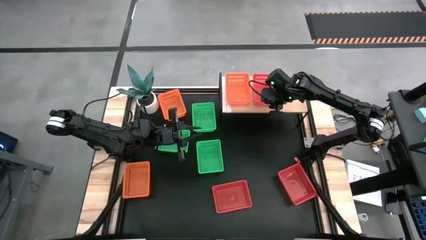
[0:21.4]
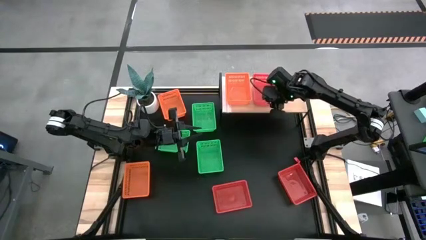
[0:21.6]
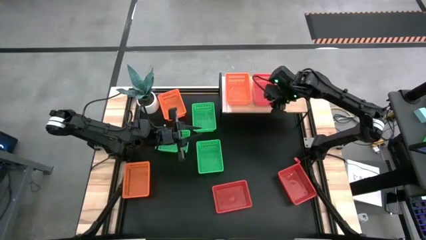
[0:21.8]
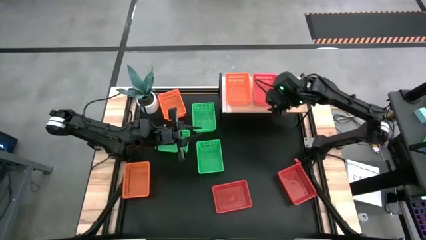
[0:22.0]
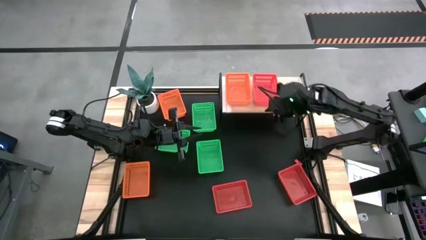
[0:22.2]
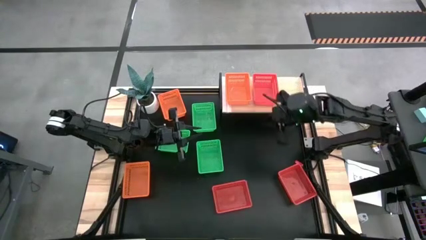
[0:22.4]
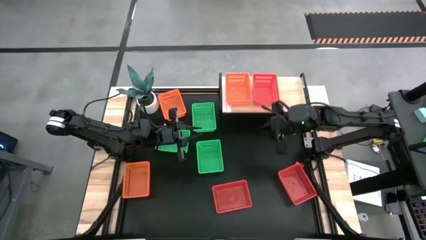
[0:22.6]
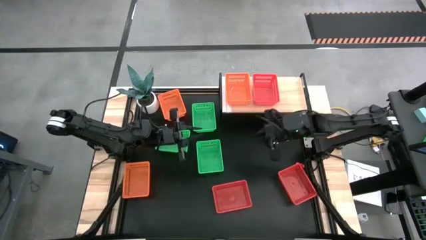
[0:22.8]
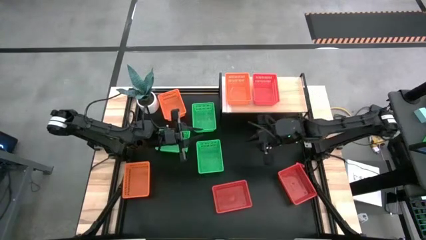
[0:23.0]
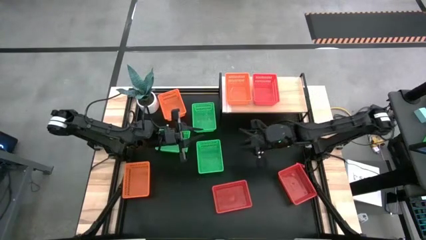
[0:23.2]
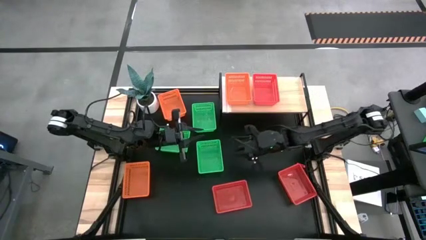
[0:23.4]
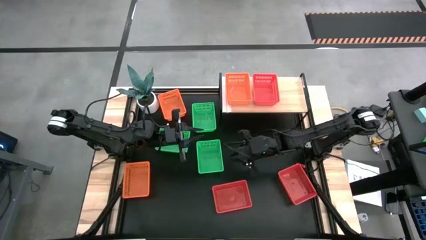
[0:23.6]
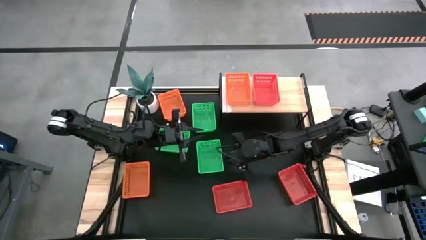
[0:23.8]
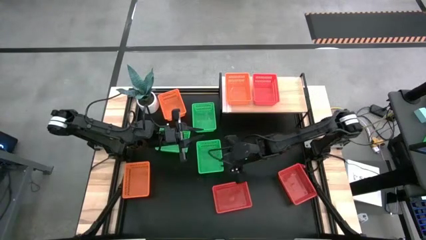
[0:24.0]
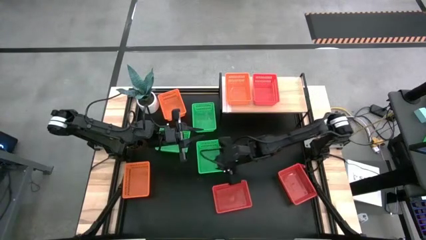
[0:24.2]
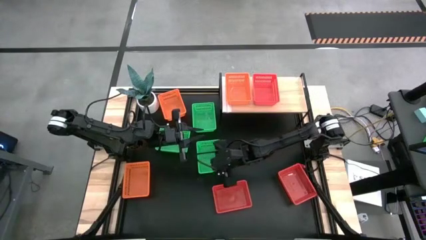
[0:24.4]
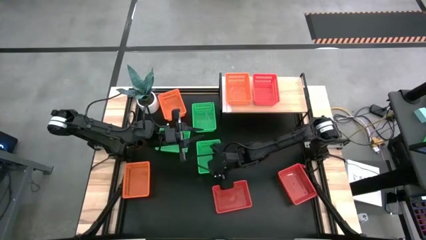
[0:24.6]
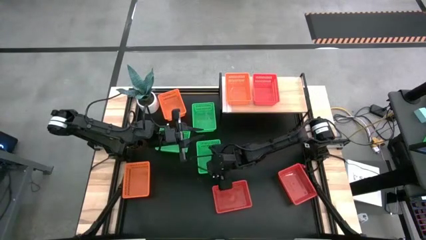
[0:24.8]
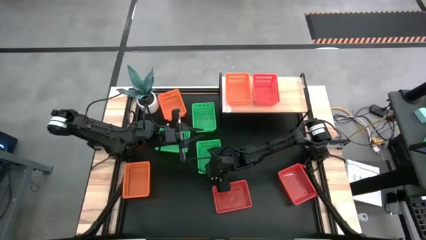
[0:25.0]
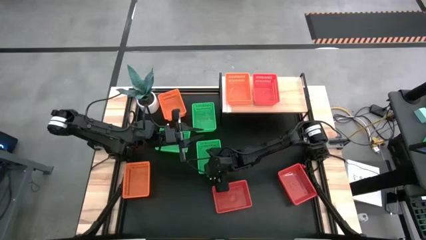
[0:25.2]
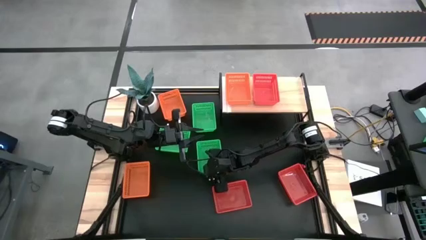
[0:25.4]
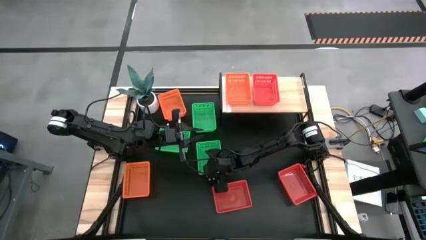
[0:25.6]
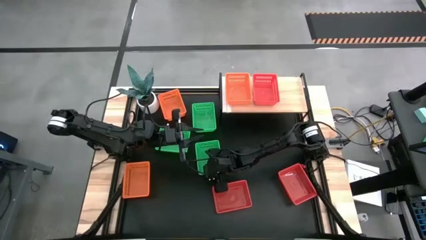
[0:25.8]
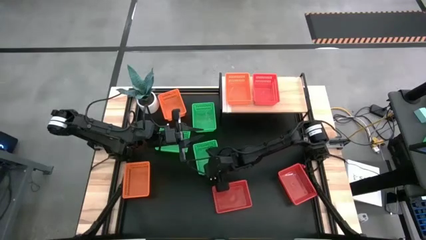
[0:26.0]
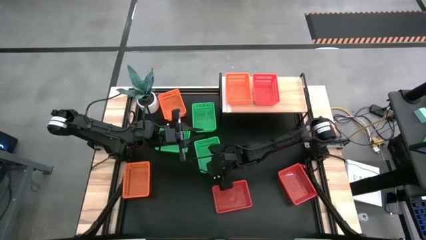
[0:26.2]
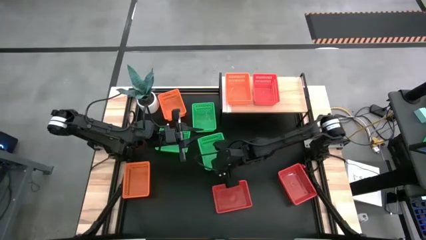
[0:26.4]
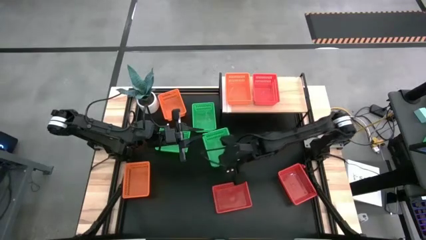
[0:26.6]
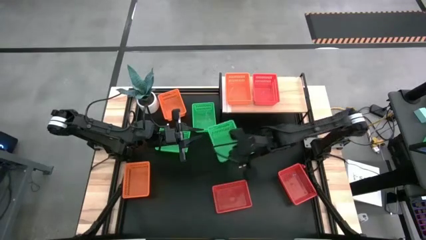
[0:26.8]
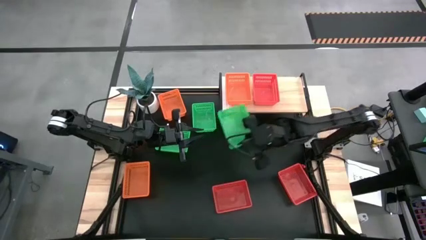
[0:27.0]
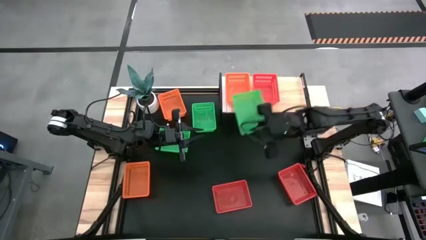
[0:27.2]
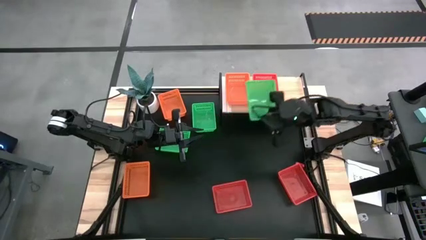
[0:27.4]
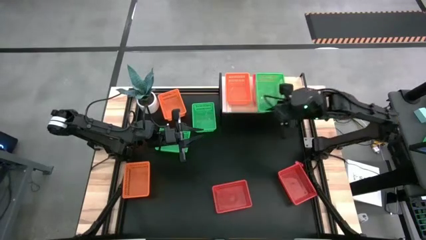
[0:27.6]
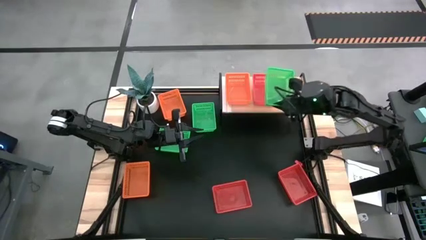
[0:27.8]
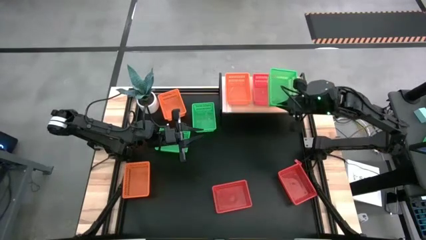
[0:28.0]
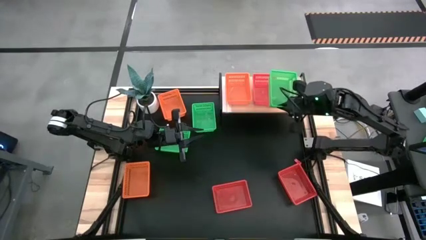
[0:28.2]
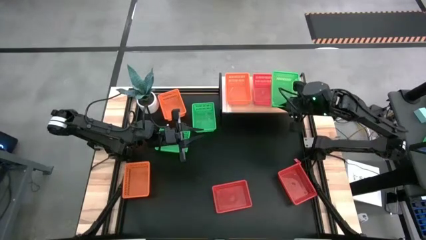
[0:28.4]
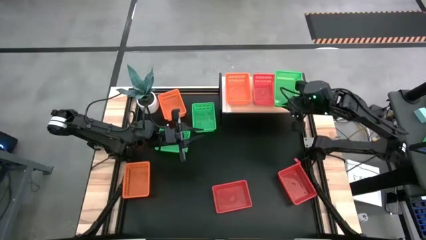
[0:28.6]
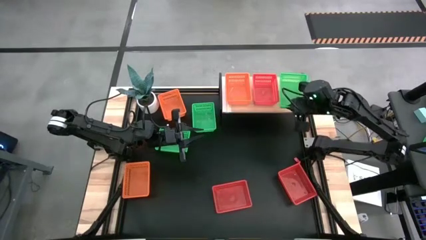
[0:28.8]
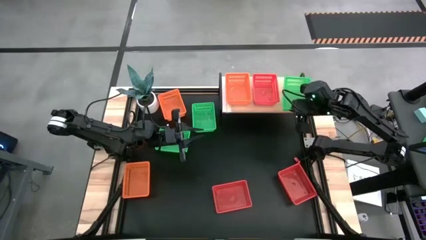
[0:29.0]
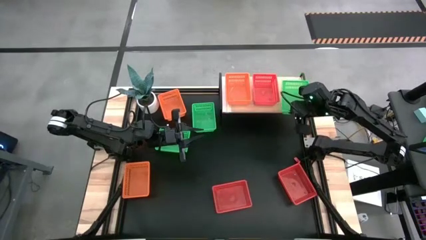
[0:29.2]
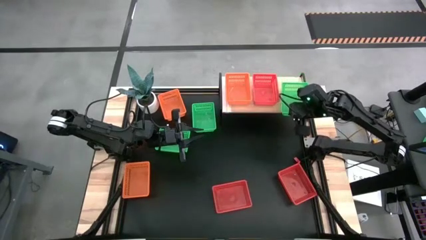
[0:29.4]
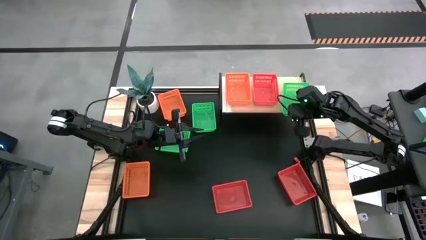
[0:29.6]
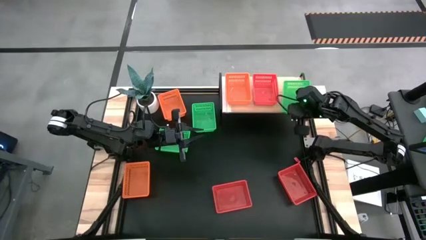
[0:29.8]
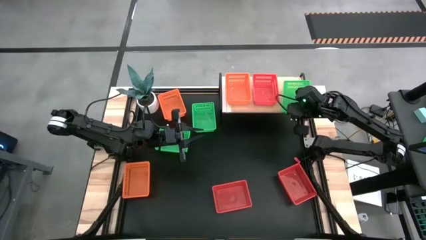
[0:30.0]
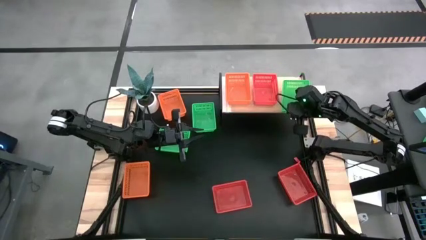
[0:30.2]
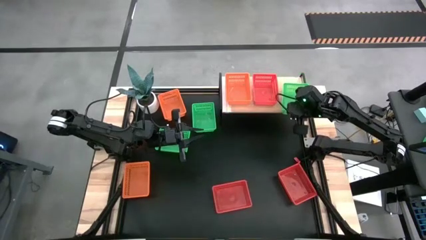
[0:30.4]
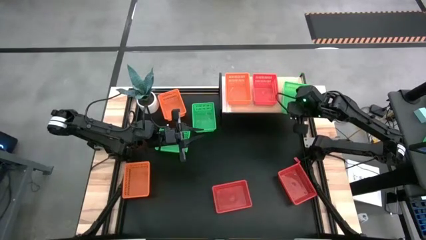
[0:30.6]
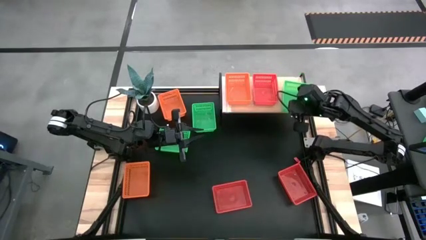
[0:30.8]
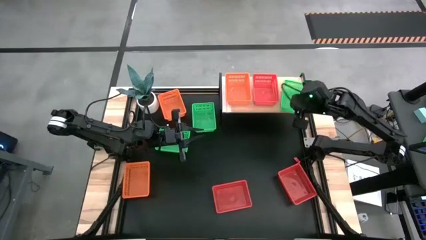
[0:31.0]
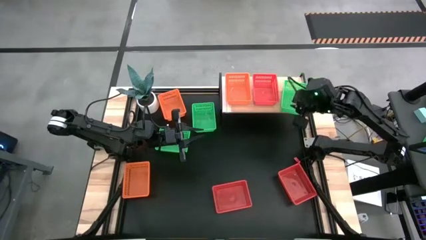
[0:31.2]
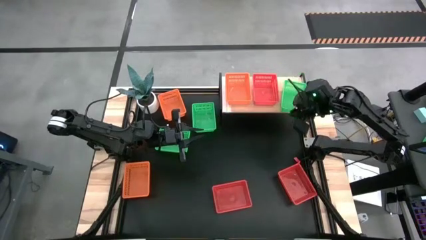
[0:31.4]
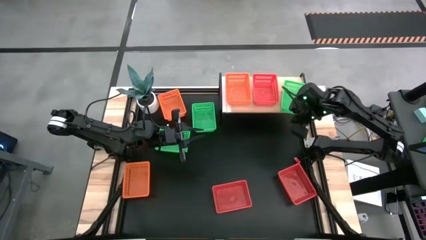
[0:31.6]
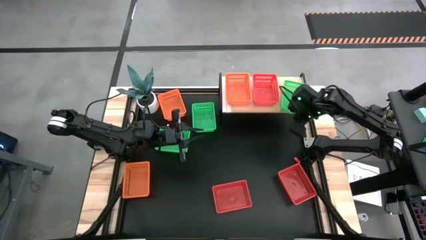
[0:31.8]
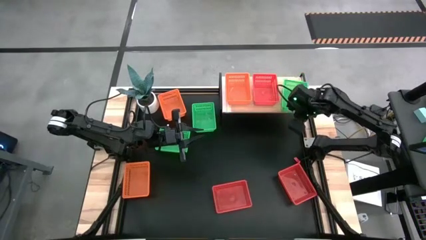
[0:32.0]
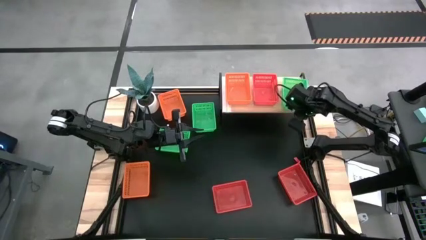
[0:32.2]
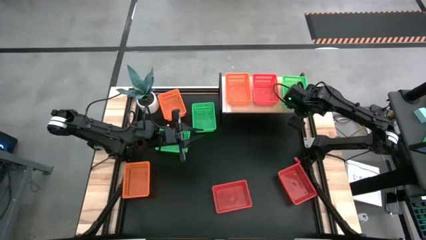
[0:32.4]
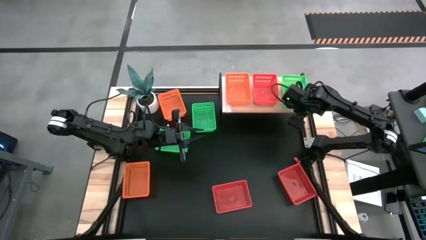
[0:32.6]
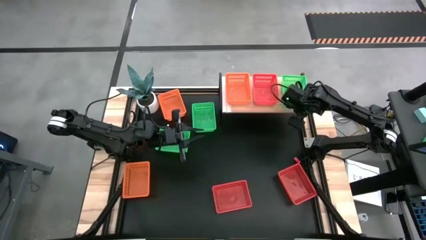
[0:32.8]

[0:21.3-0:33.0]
Task: Stack baskets on shelf by color
Put the bottom right green bin on the shelf
